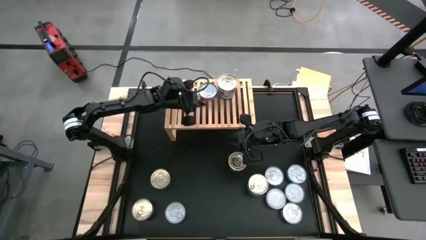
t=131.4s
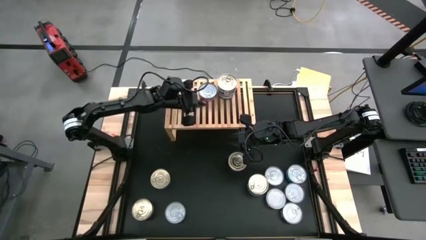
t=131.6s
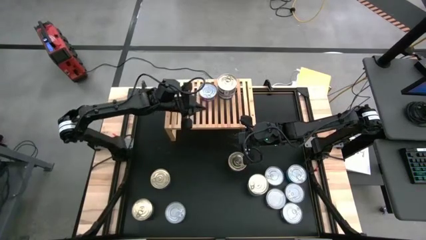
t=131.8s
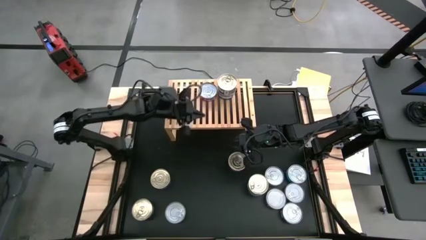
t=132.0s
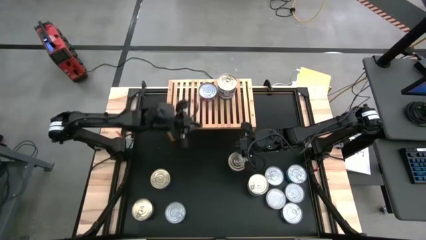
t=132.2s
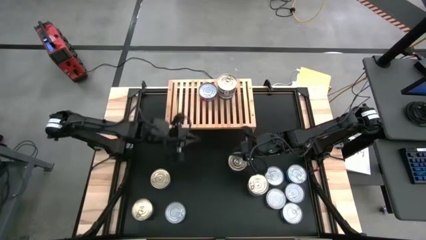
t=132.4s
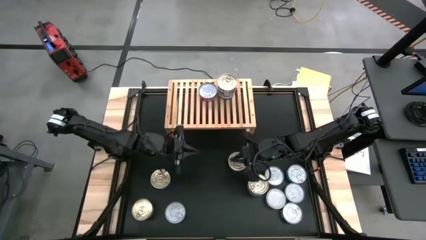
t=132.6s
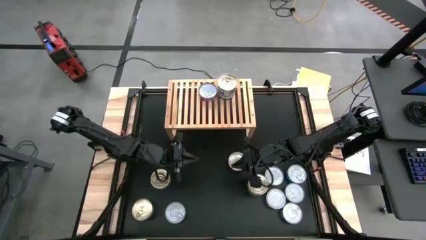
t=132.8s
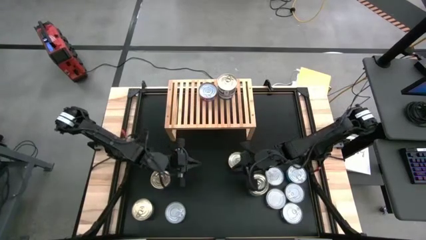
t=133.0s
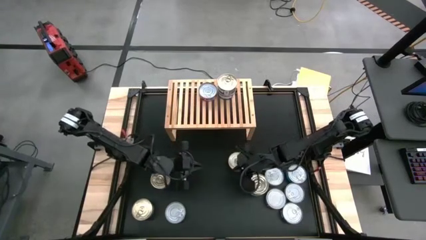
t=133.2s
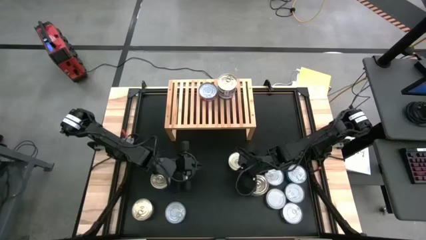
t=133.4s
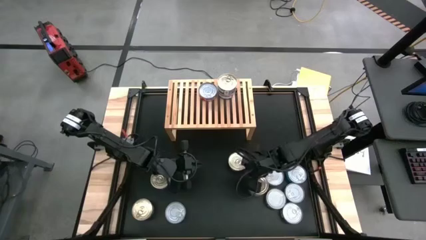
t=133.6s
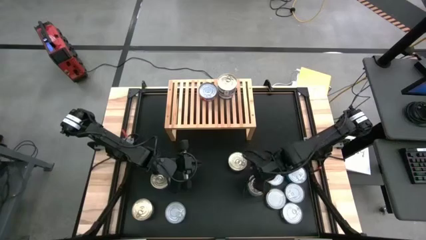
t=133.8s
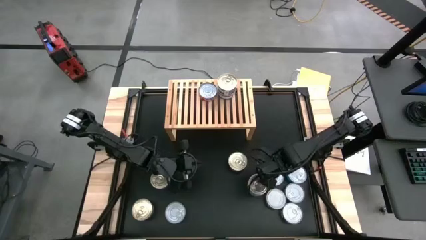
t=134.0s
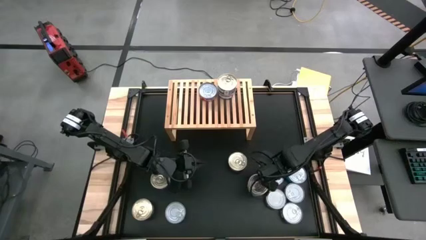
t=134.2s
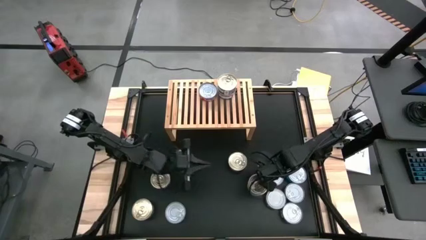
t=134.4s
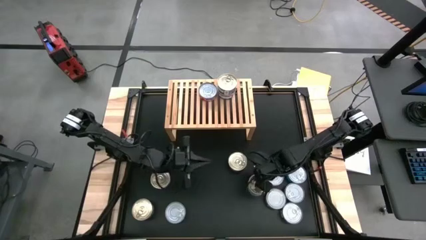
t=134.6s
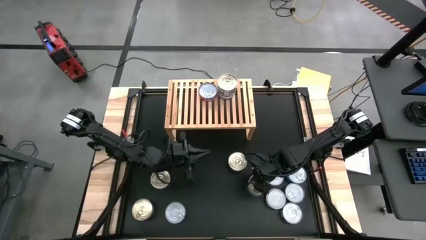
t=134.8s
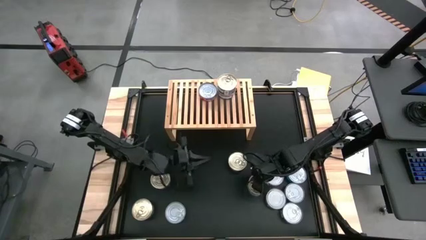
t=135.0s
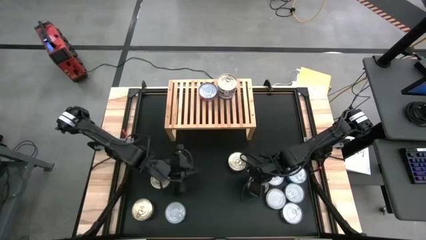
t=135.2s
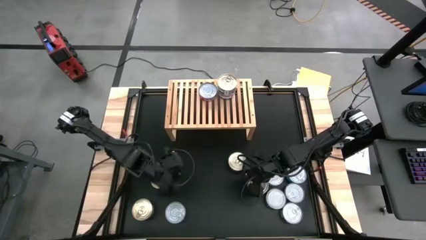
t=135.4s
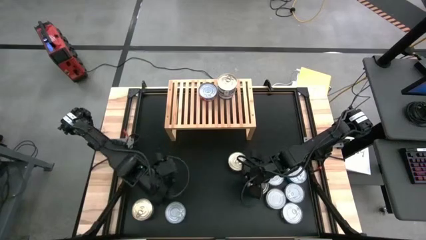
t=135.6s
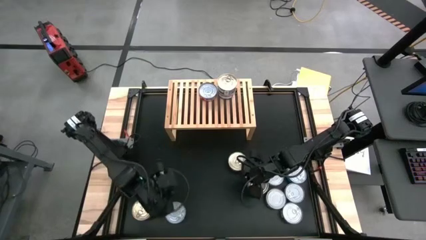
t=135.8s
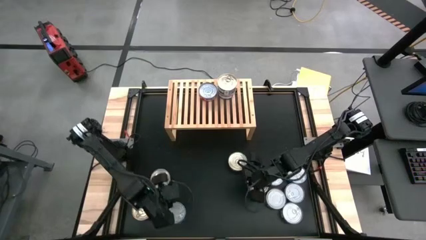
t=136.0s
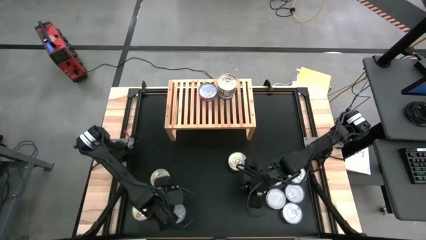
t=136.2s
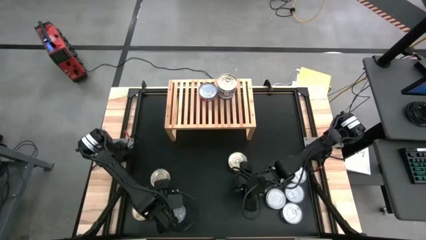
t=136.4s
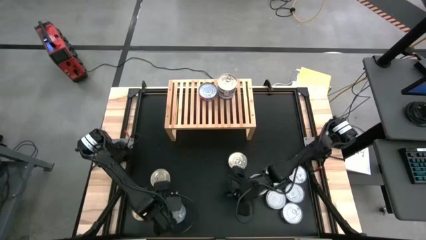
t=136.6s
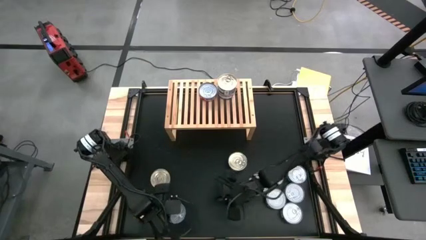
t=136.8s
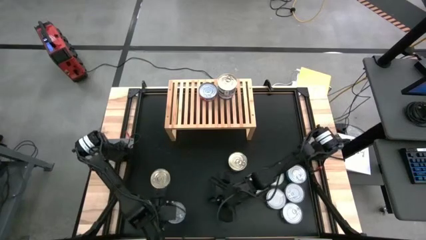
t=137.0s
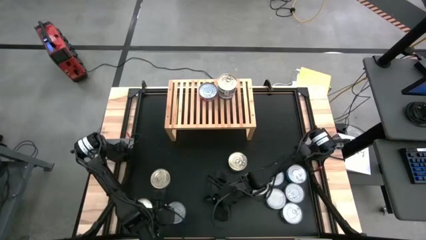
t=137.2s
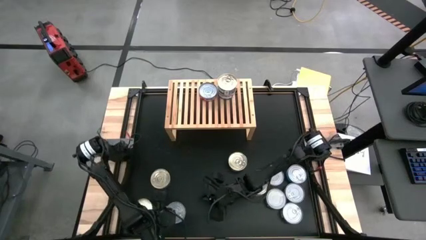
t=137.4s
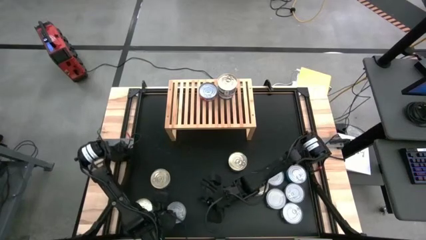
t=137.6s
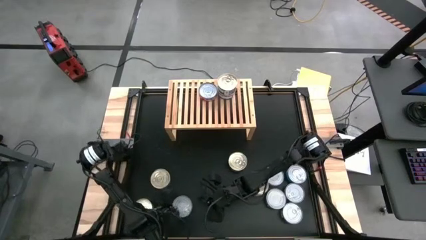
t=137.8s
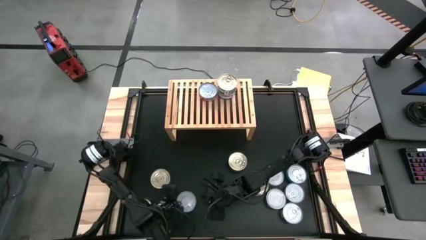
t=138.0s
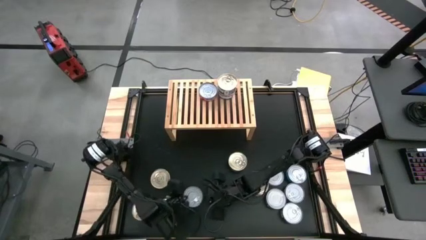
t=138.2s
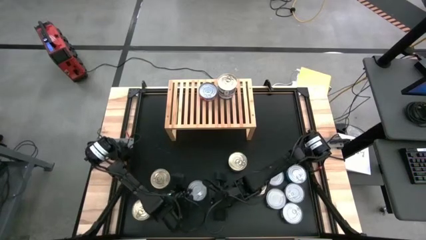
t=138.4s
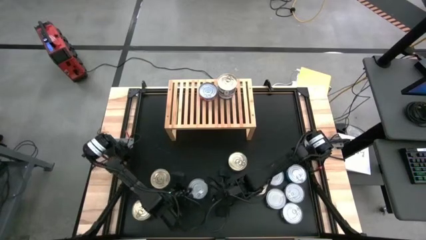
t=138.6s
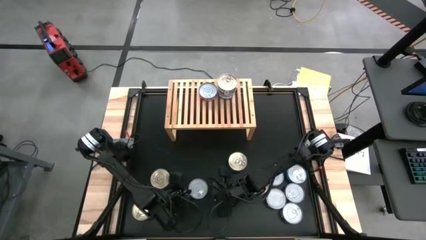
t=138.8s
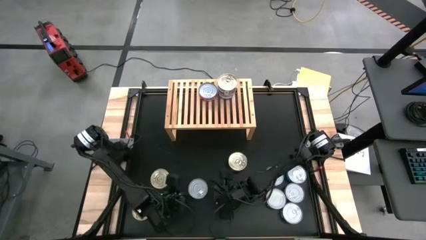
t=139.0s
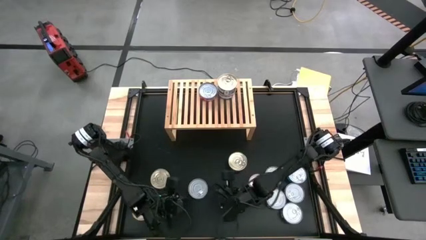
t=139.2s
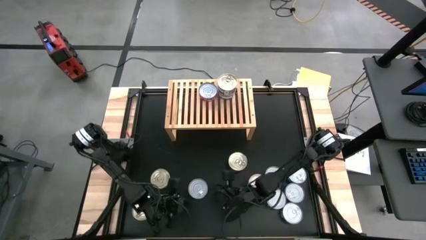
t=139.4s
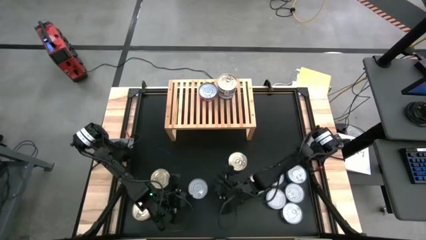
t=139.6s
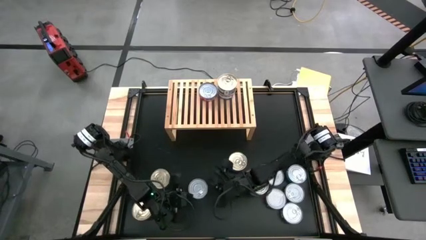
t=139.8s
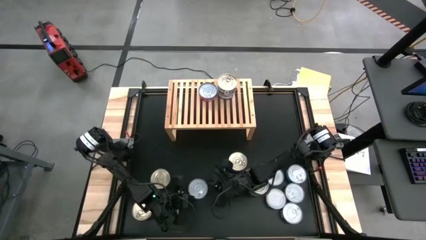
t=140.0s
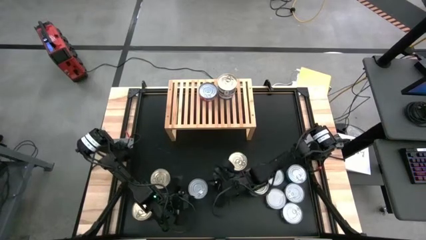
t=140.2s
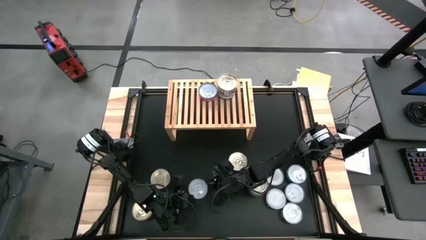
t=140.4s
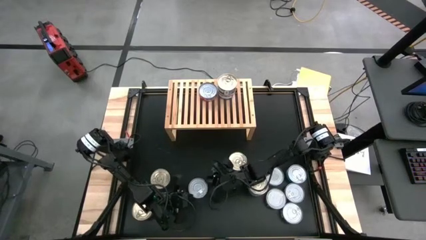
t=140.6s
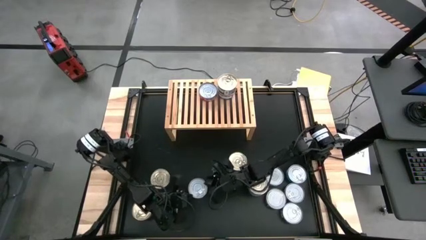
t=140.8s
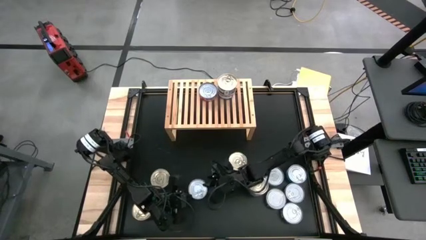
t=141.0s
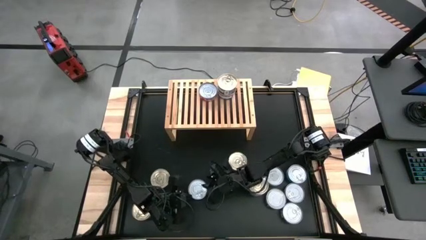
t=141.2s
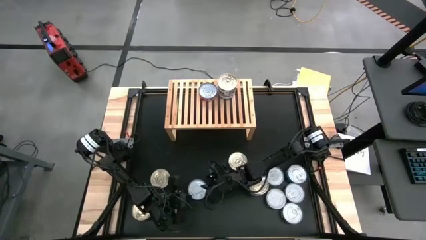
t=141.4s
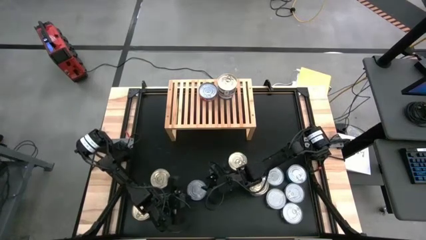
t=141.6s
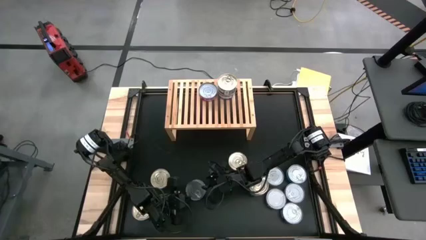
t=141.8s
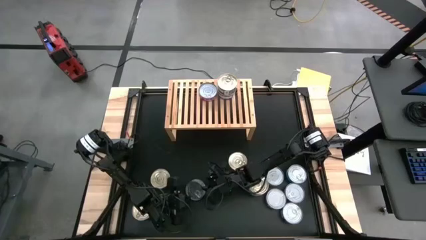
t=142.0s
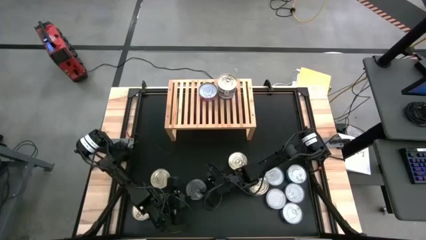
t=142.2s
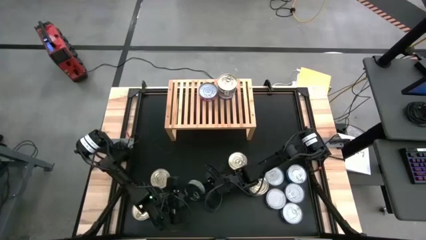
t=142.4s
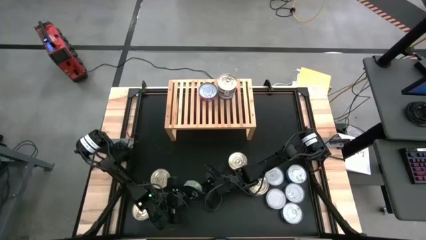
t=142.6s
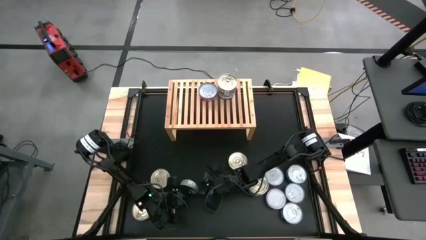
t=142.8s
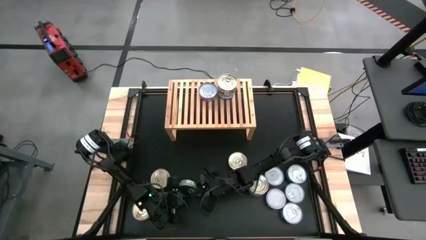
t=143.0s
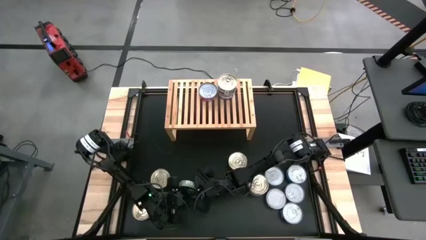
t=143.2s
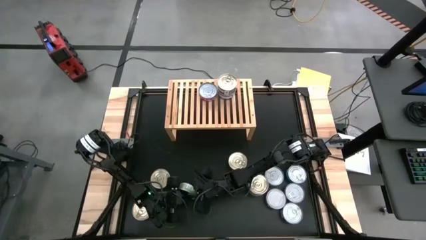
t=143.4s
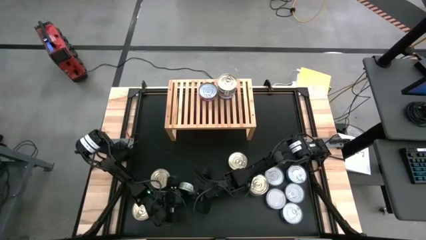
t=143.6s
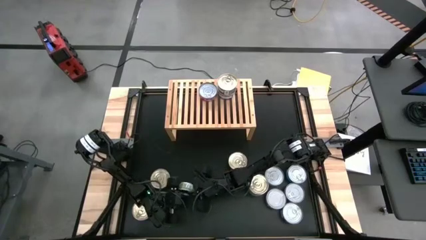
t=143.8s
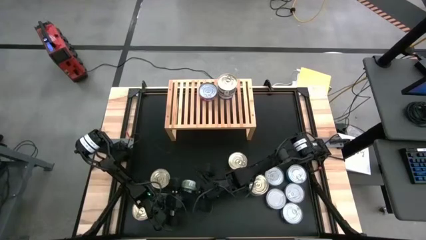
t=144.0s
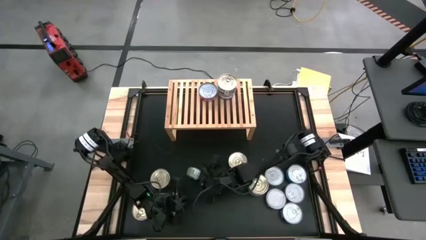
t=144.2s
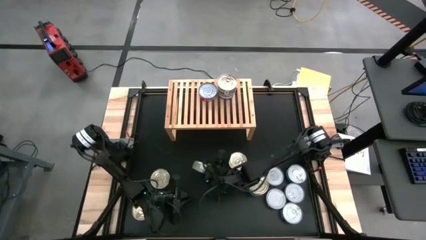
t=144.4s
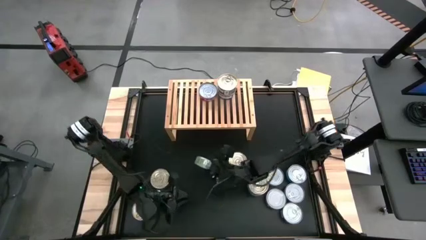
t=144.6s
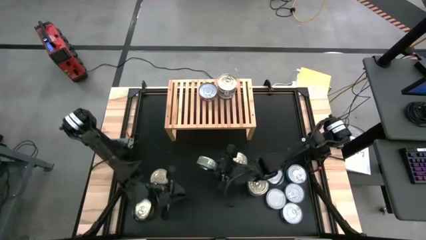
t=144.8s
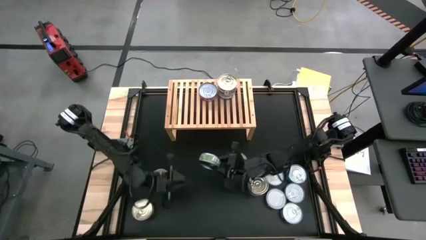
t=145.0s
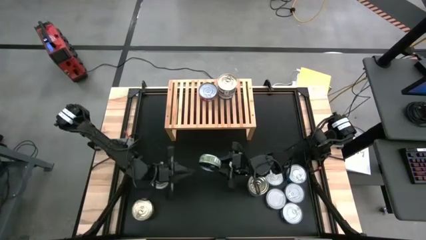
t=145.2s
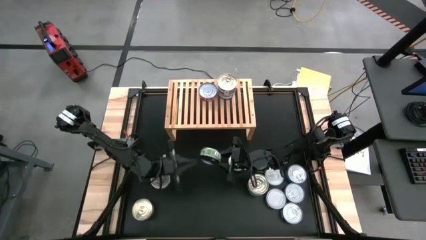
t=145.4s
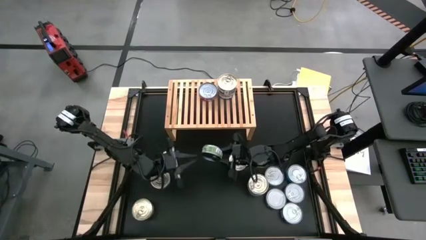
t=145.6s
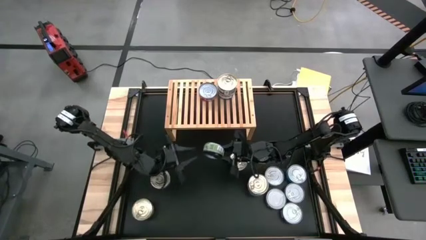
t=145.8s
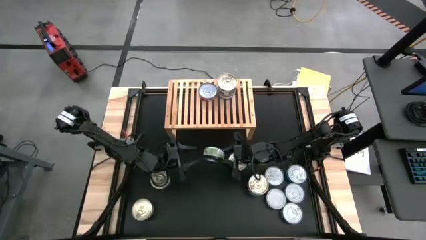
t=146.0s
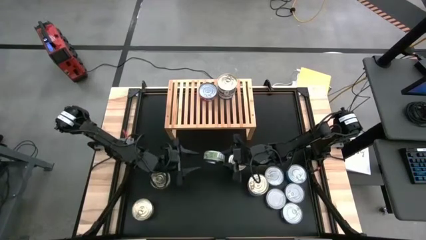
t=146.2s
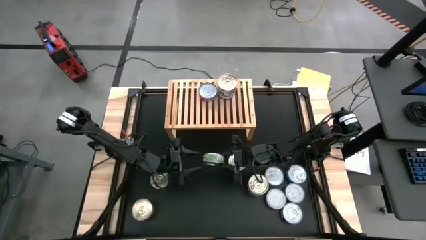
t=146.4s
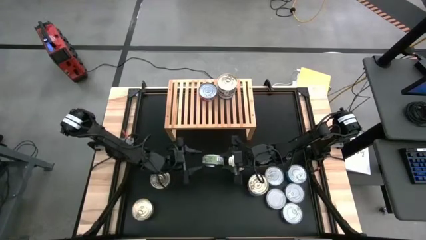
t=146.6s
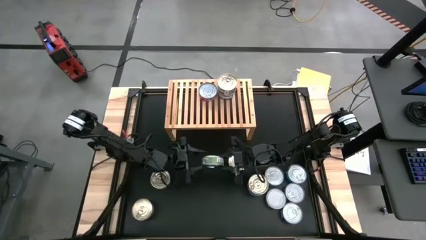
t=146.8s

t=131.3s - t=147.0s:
Task: Stack canned seafood by type on shelf
Put the green tuna can on the shelf
